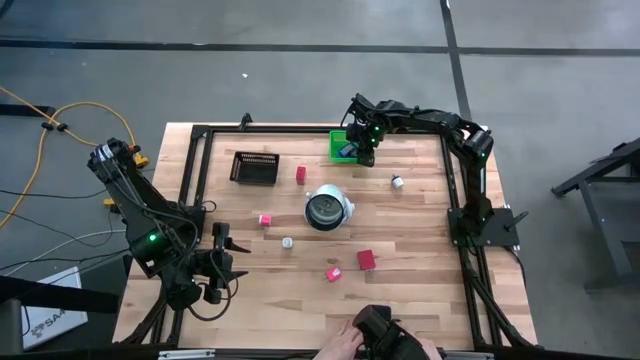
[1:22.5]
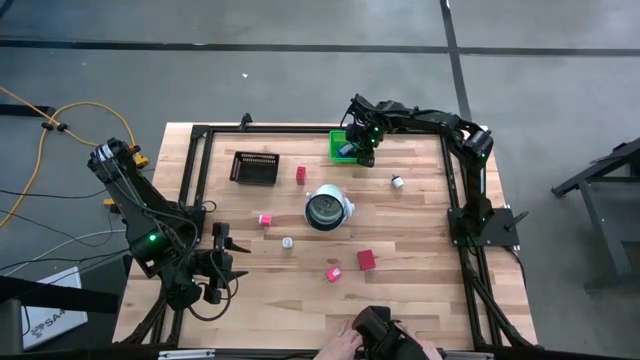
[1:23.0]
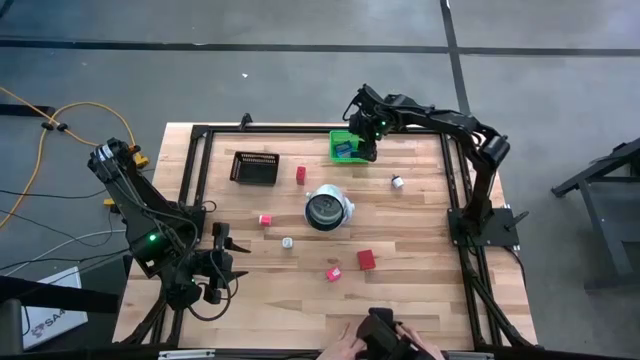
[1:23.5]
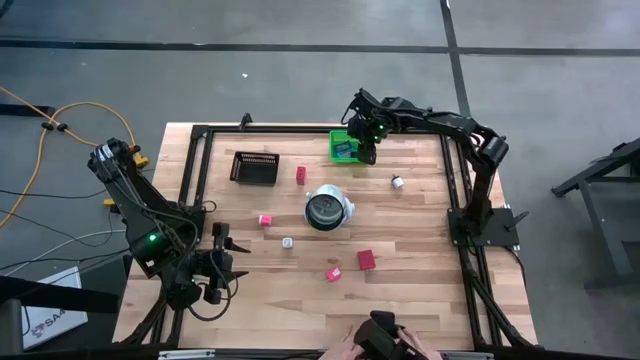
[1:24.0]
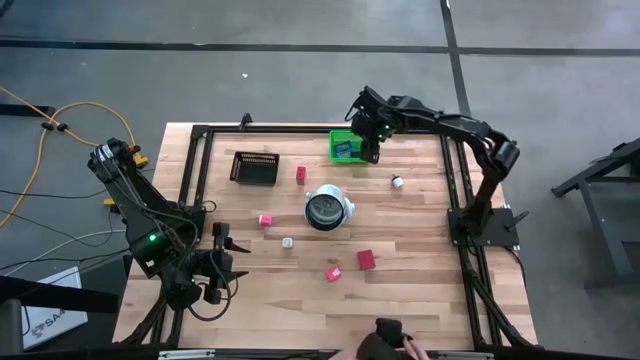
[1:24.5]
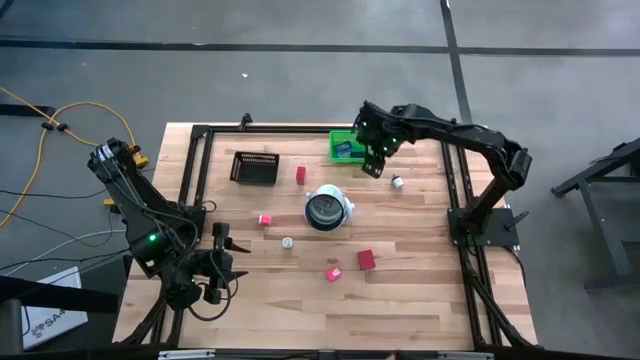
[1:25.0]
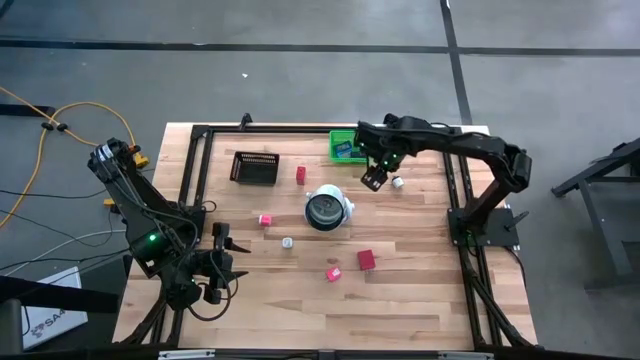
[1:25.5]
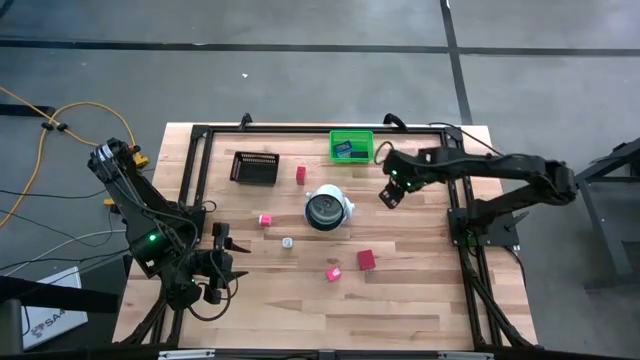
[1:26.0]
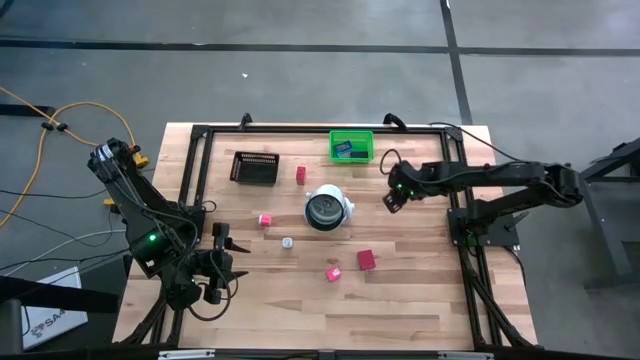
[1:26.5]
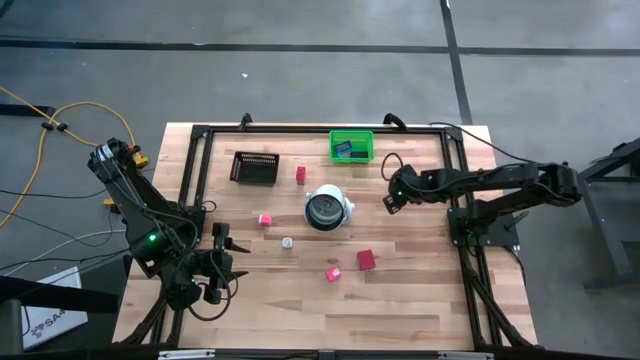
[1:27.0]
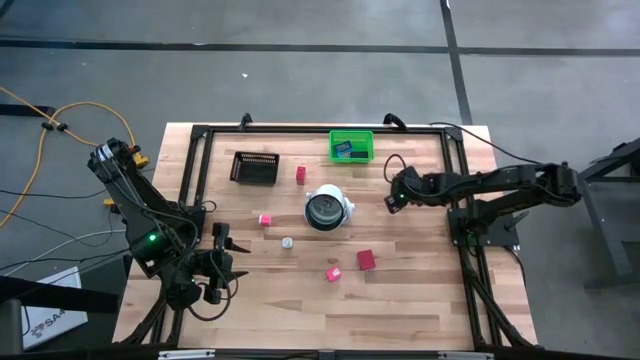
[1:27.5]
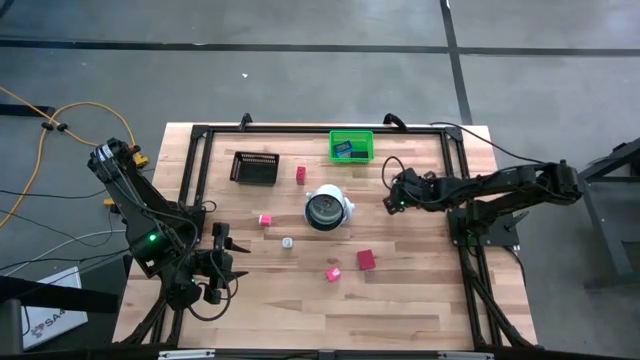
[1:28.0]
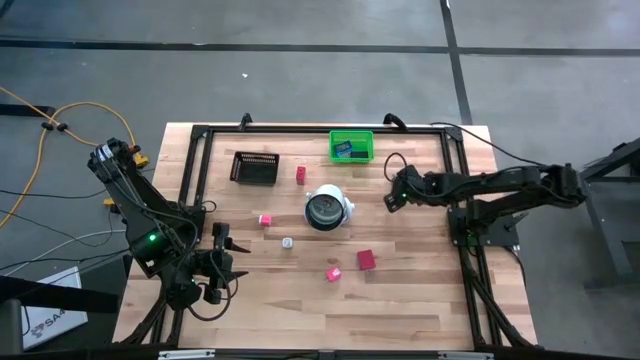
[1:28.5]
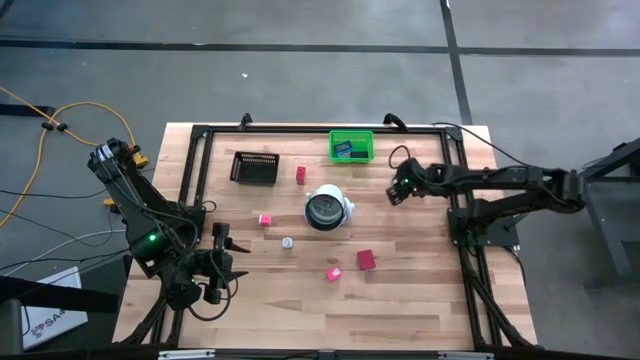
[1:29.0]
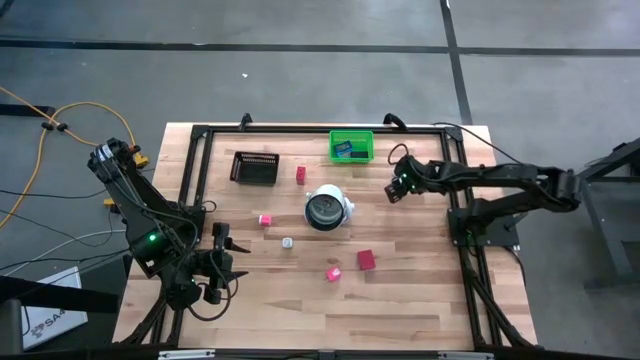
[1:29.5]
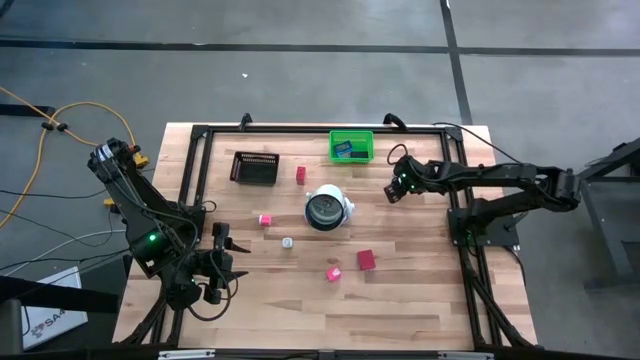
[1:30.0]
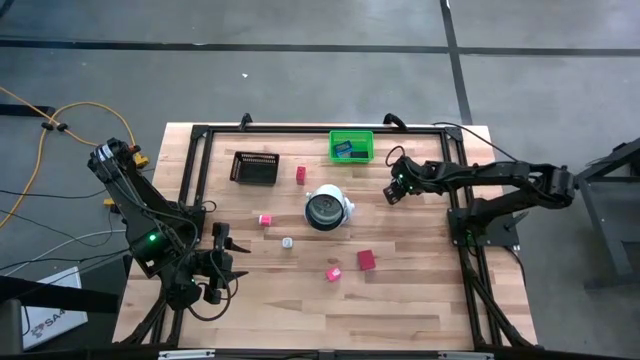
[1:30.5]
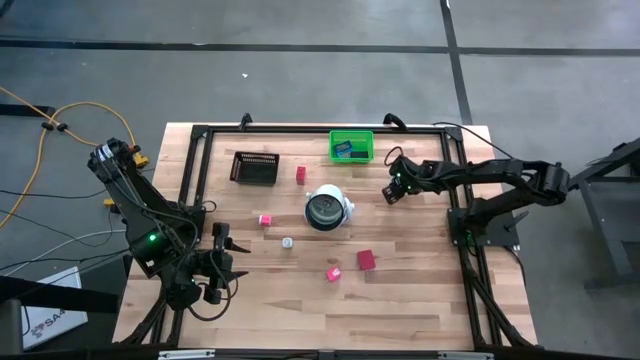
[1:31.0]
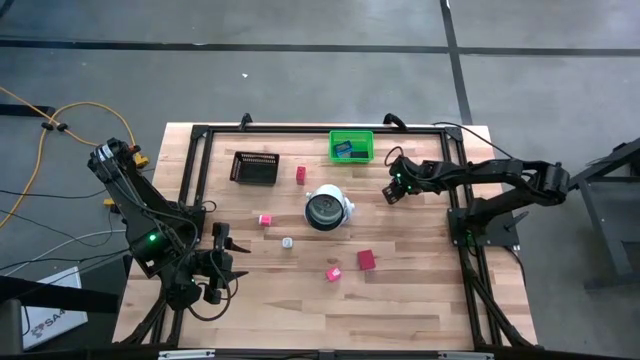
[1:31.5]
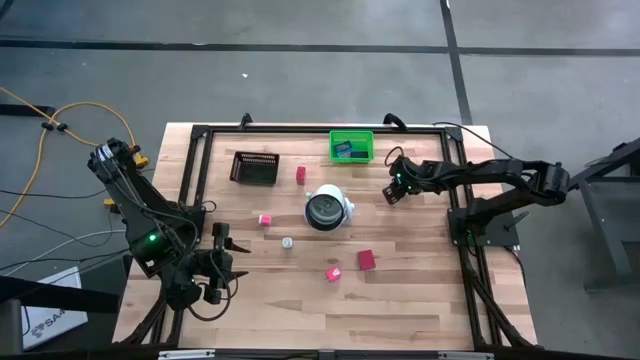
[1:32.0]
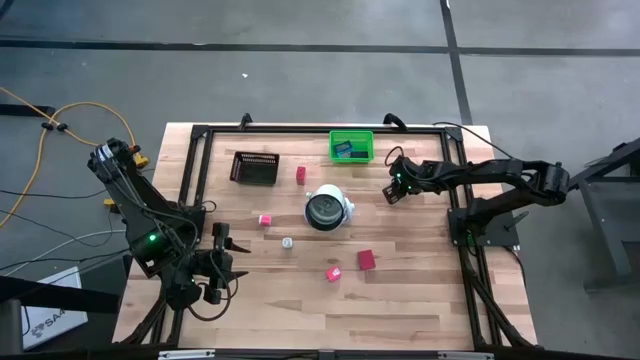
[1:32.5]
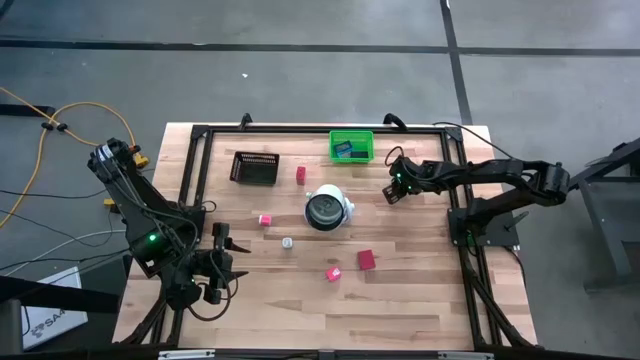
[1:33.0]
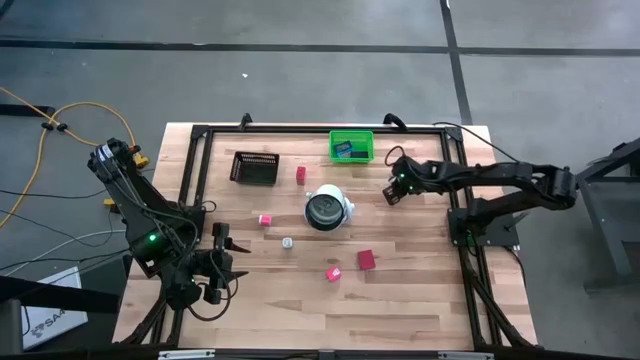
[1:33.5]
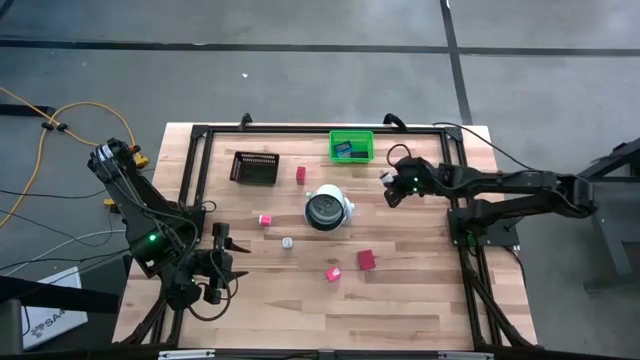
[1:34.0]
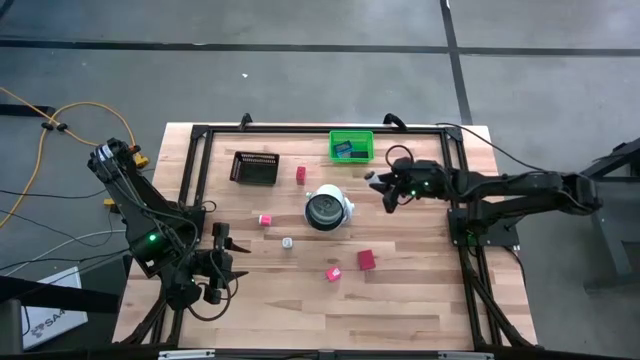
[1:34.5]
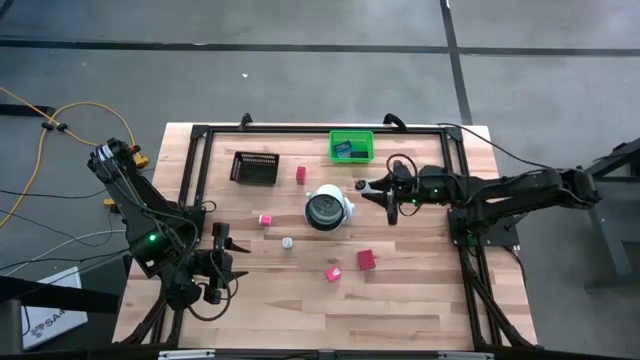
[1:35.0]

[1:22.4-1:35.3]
Task: Pick & Place Office items
Put the white charger adapter into the black bin

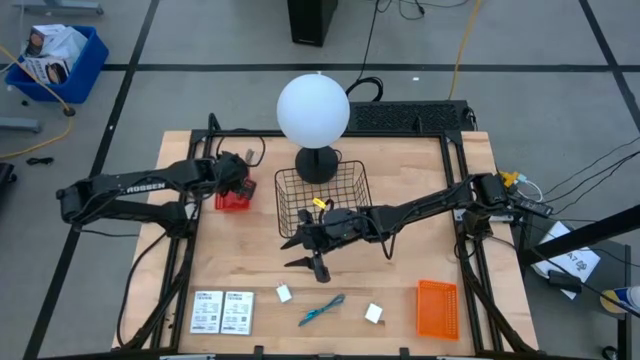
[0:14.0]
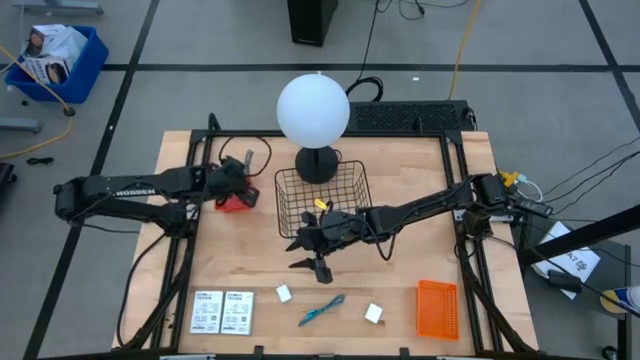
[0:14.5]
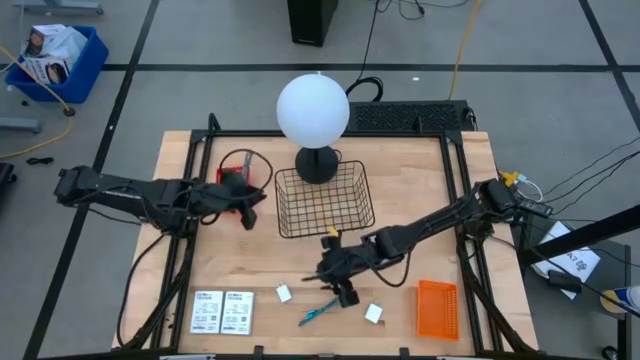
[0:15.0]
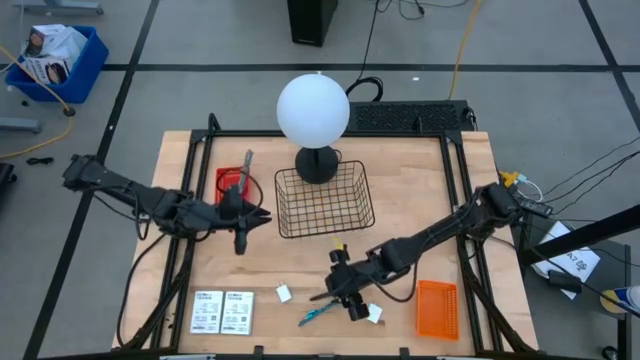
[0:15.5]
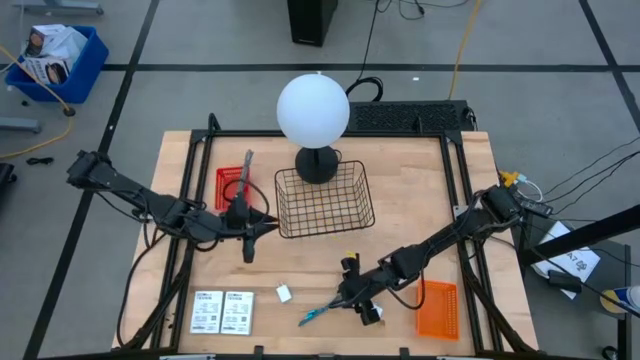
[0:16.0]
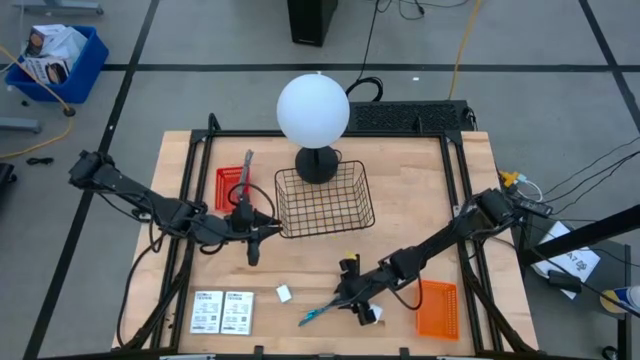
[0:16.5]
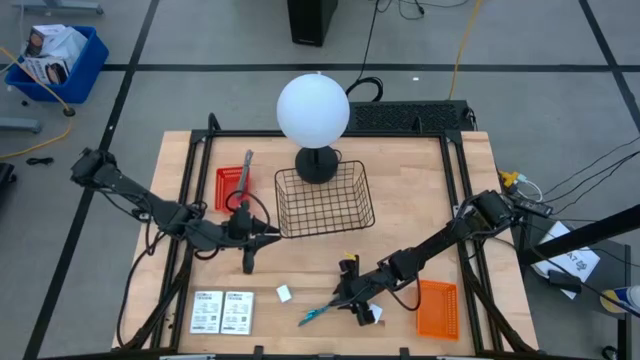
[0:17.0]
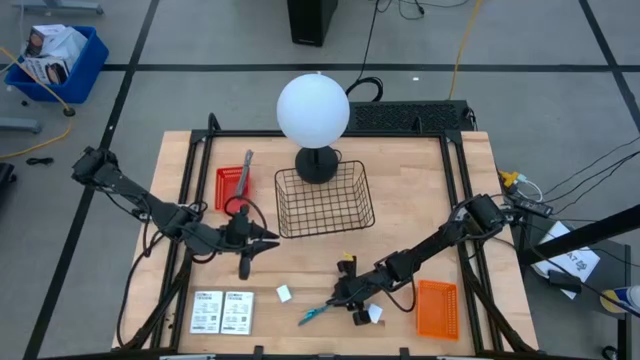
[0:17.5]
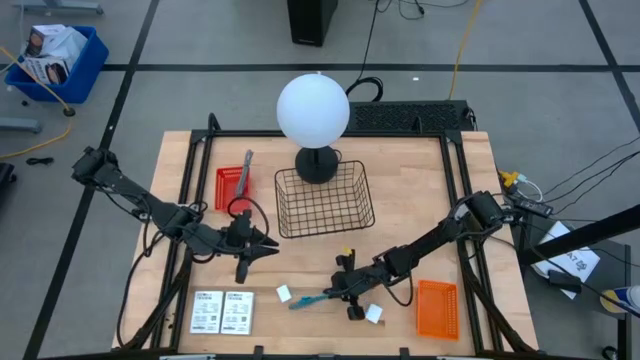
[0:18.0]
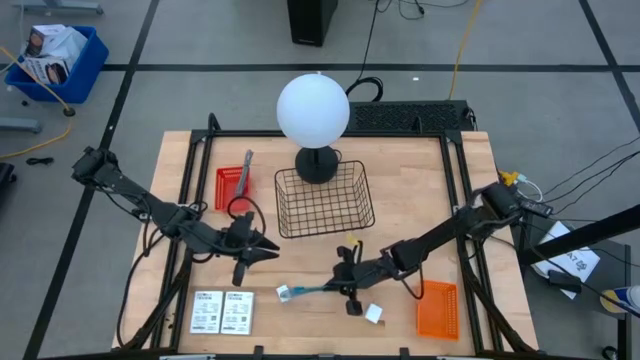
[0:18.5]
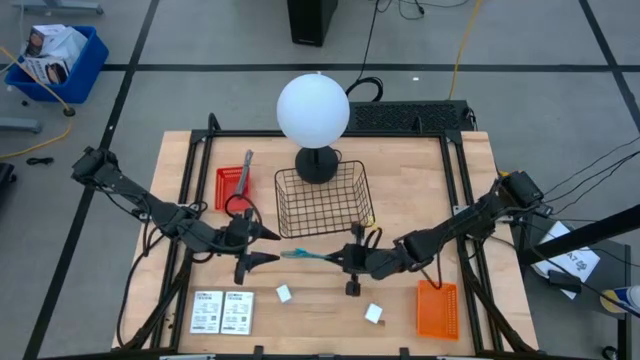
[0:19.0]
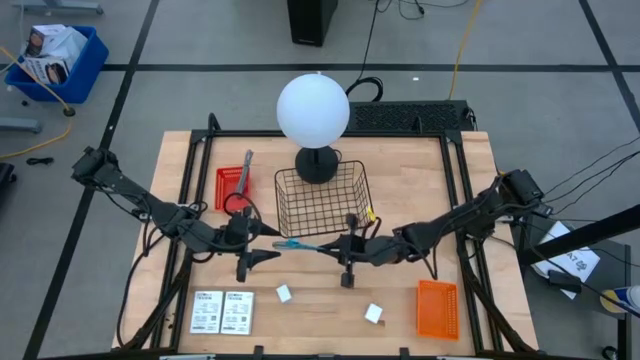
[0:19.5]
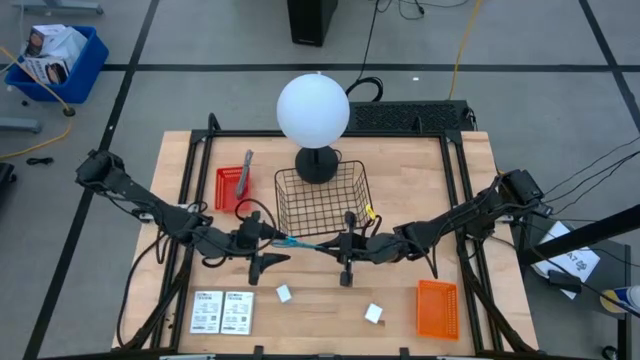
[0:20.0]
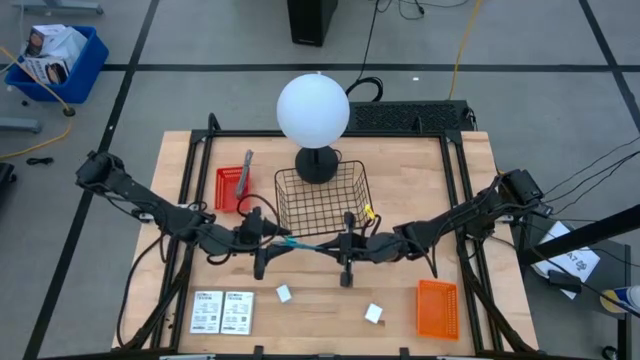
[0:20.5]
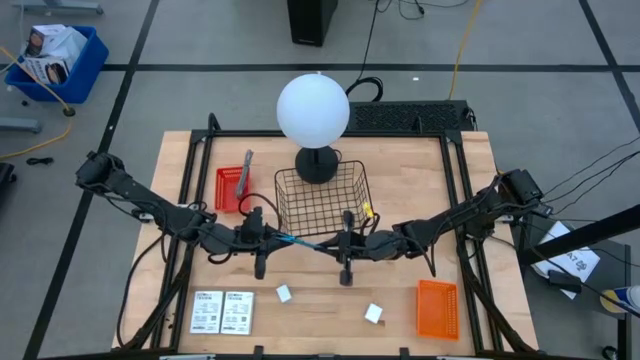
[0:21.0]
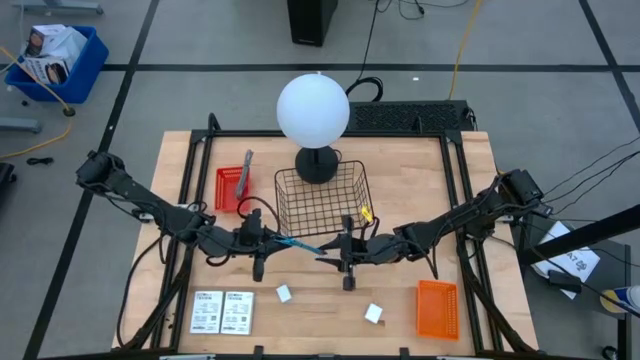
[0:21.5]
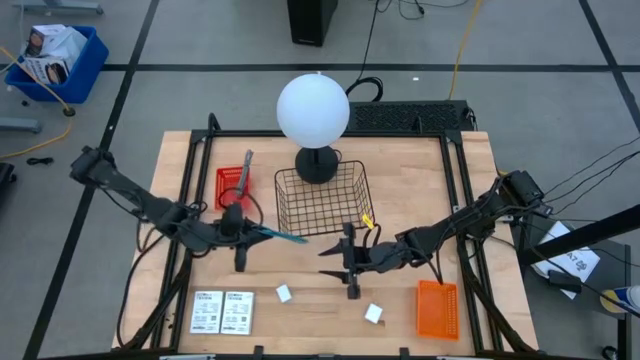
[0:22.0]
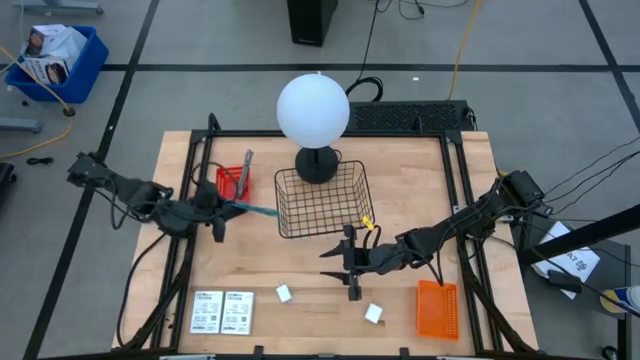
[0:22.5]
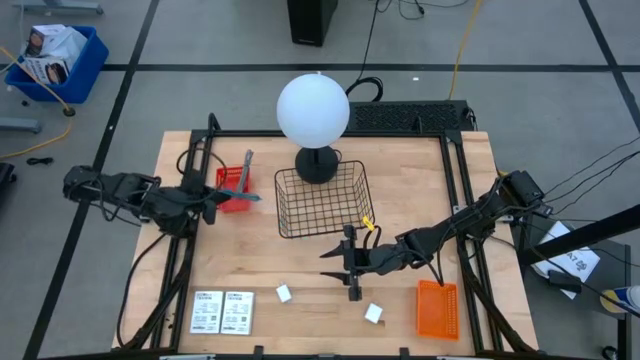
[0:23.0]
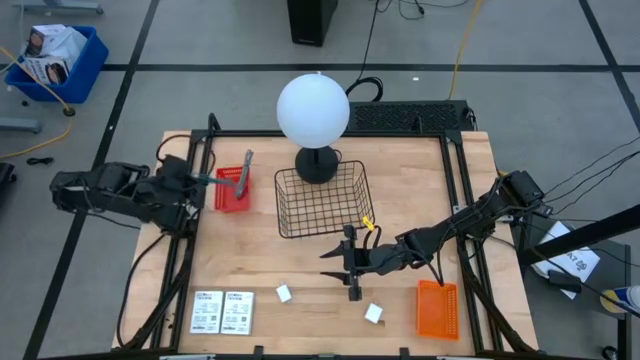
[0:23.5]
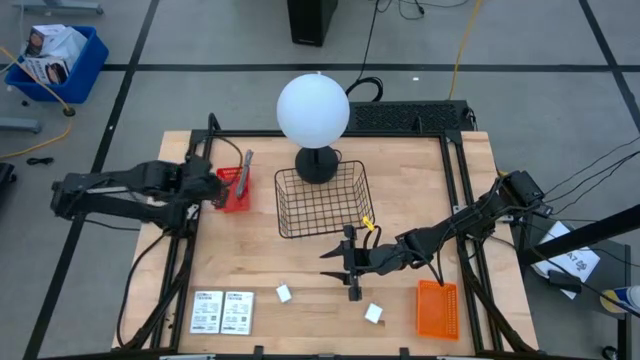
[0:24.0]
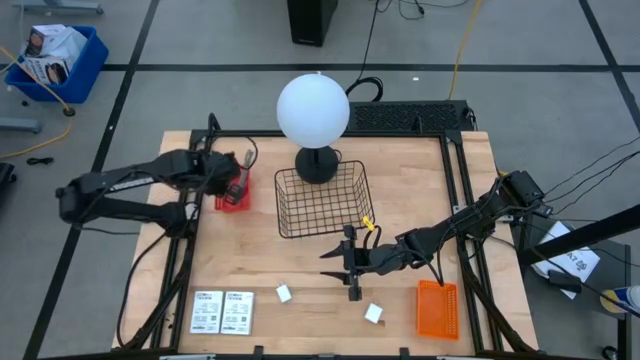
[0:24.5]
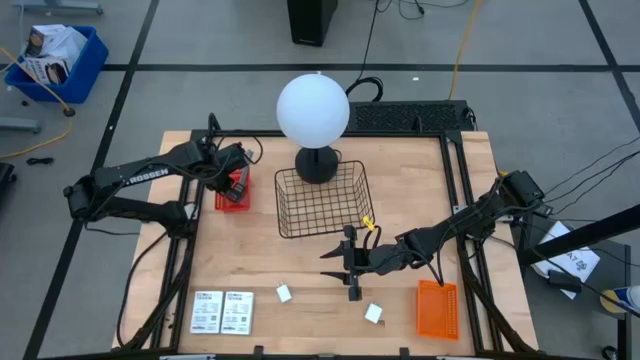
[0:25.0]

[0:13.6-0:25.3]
Task: Pick and place items into bin
Put the blue charger cable into the red bin
